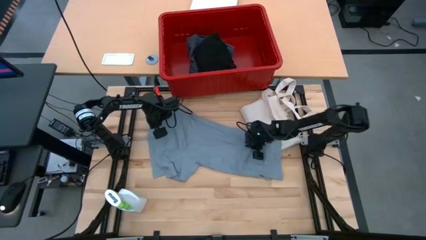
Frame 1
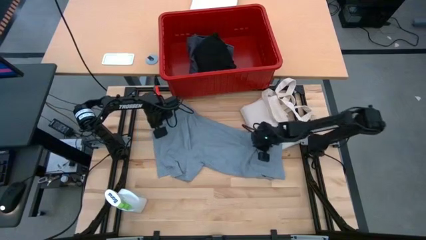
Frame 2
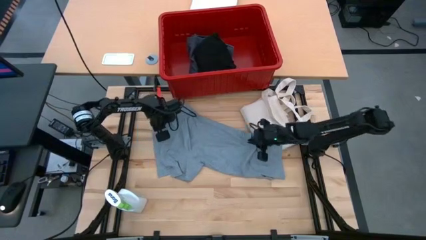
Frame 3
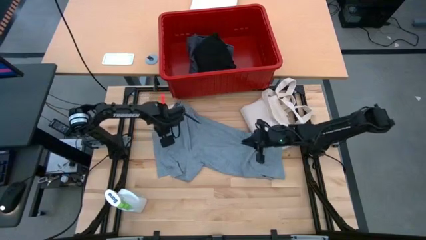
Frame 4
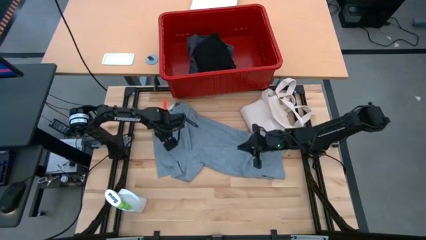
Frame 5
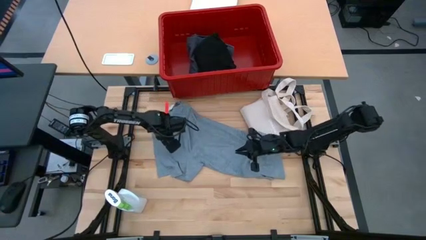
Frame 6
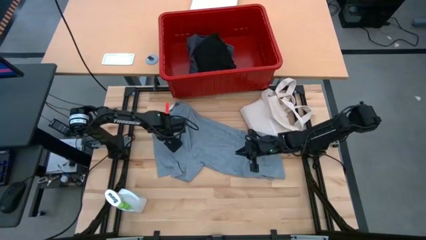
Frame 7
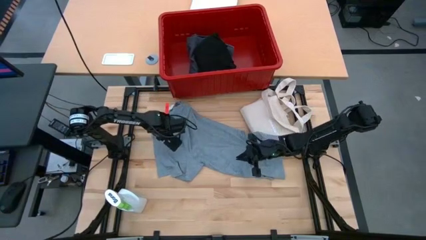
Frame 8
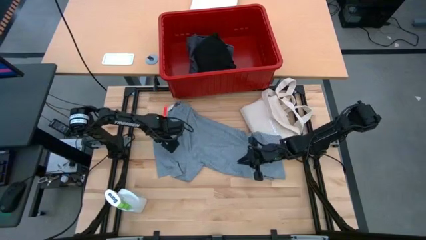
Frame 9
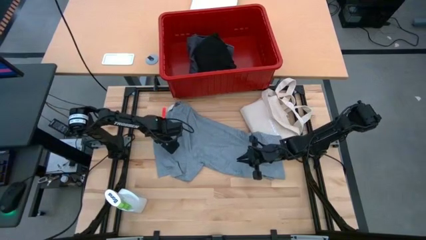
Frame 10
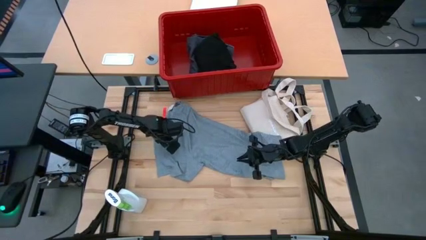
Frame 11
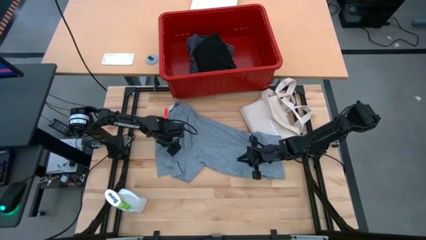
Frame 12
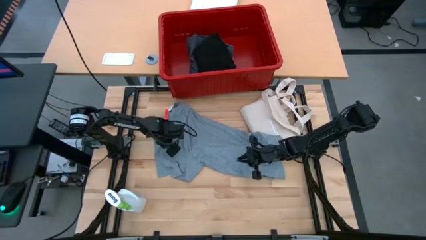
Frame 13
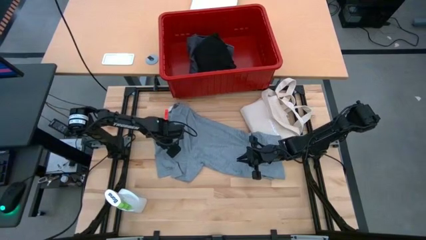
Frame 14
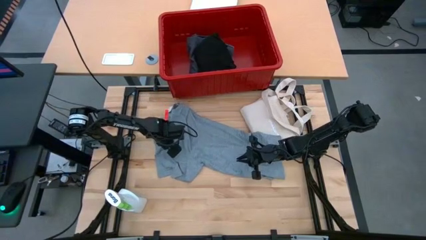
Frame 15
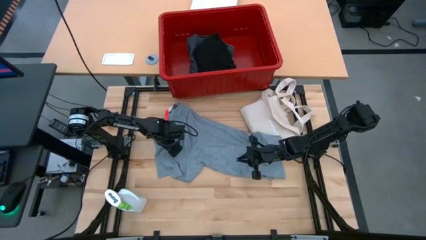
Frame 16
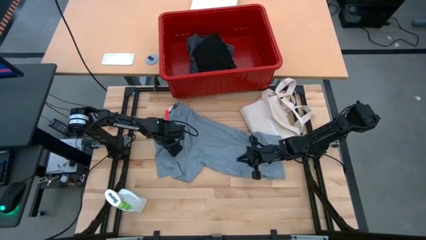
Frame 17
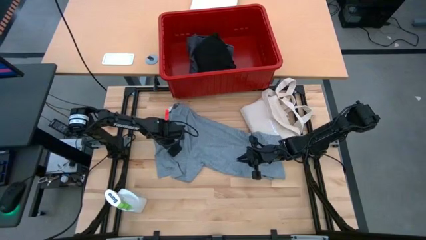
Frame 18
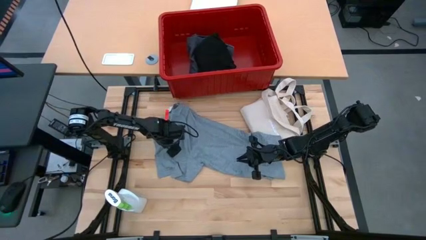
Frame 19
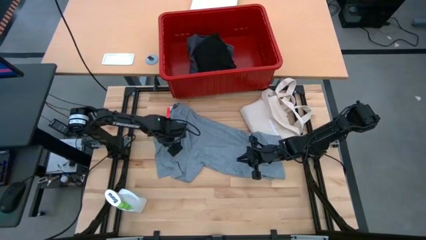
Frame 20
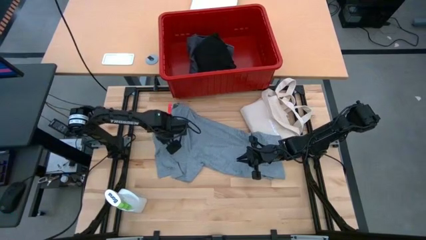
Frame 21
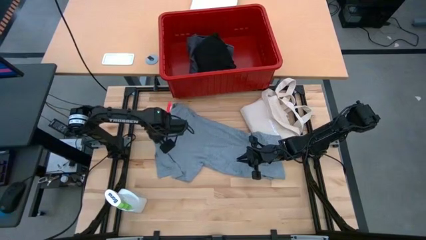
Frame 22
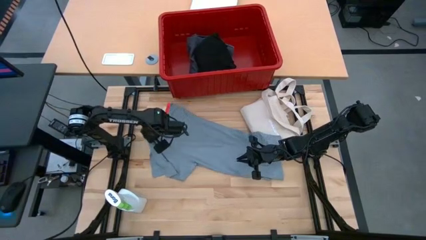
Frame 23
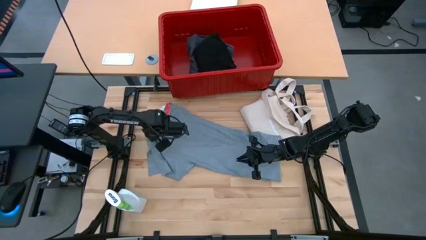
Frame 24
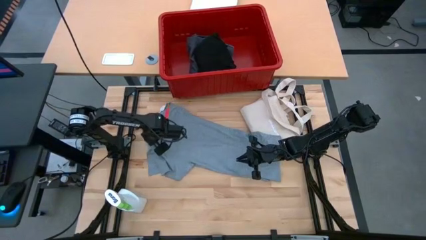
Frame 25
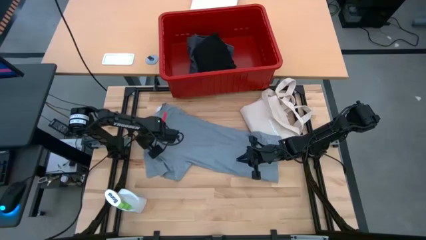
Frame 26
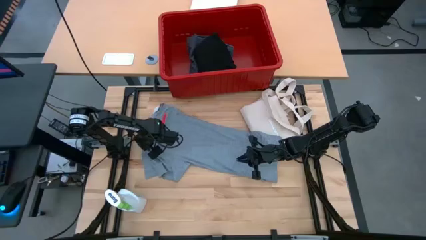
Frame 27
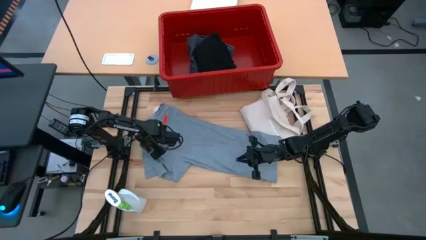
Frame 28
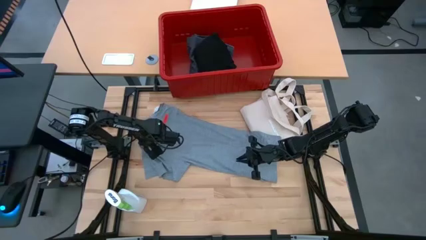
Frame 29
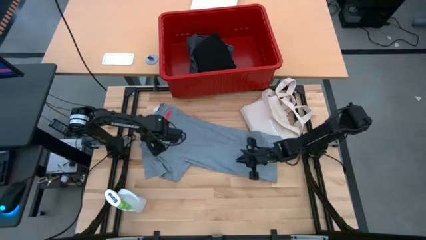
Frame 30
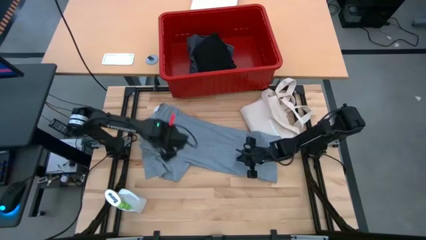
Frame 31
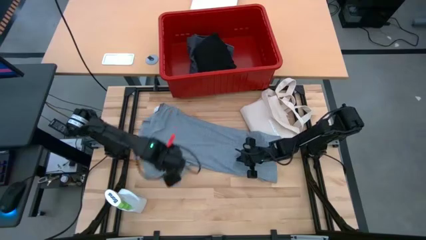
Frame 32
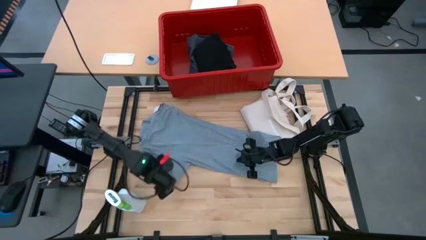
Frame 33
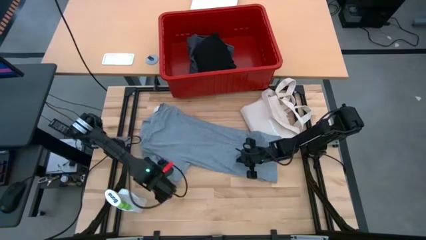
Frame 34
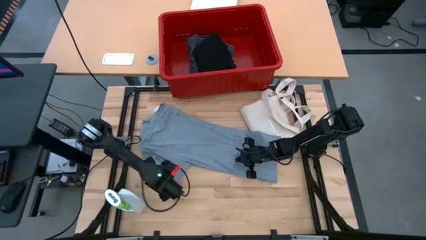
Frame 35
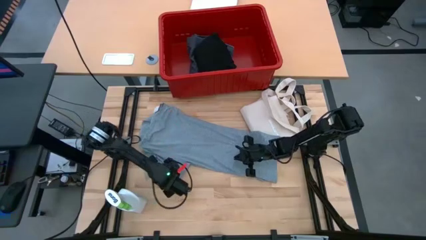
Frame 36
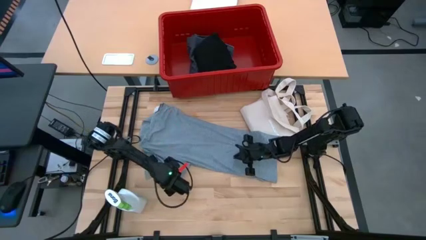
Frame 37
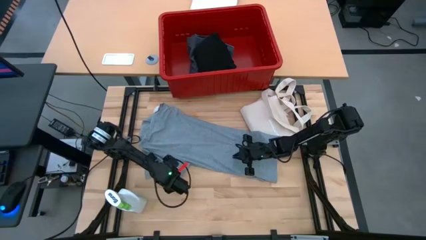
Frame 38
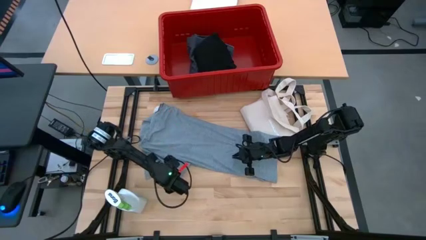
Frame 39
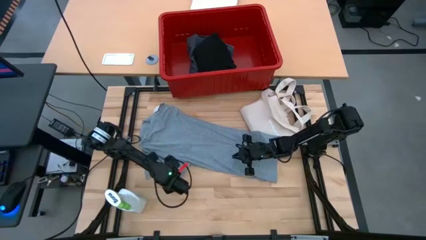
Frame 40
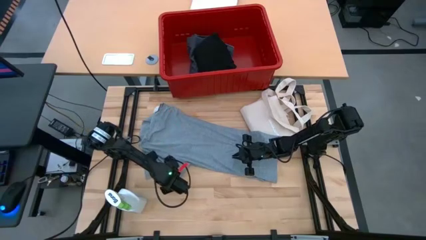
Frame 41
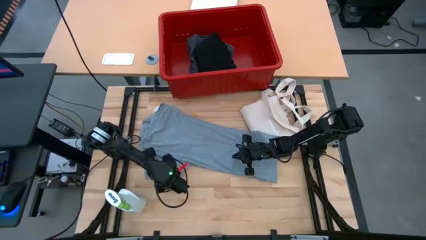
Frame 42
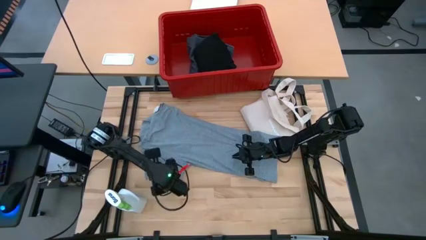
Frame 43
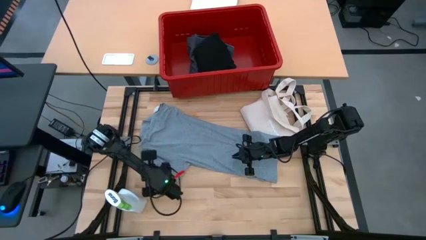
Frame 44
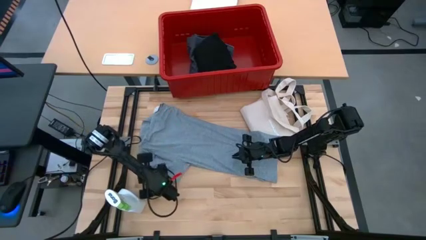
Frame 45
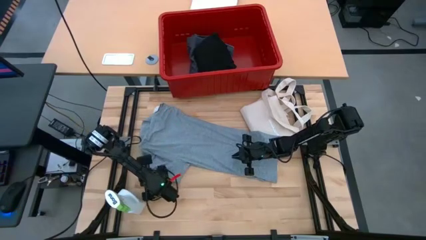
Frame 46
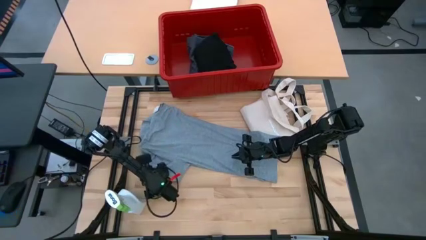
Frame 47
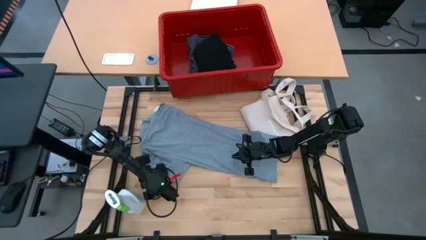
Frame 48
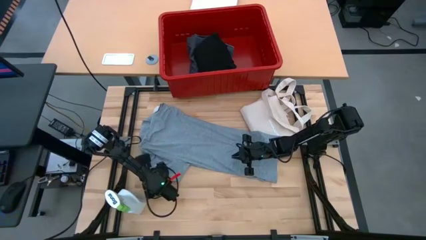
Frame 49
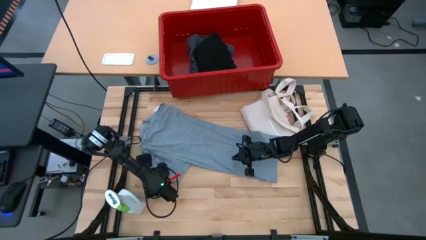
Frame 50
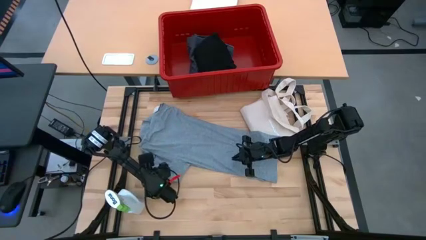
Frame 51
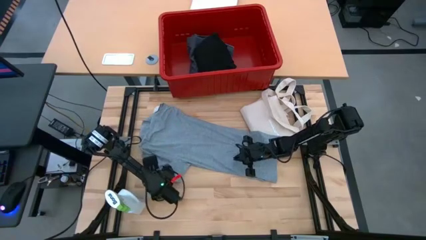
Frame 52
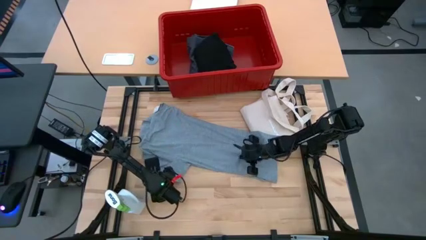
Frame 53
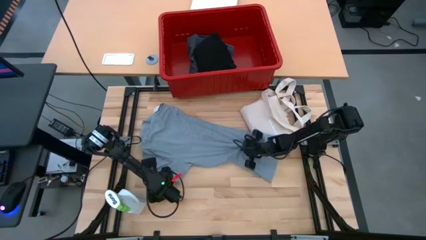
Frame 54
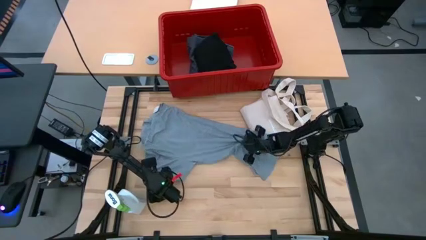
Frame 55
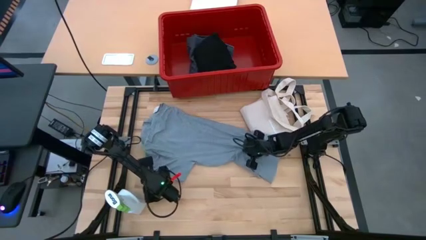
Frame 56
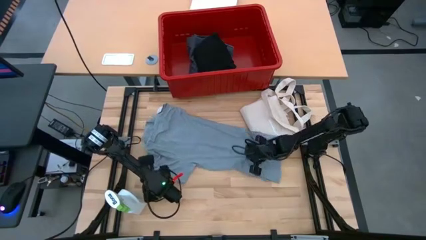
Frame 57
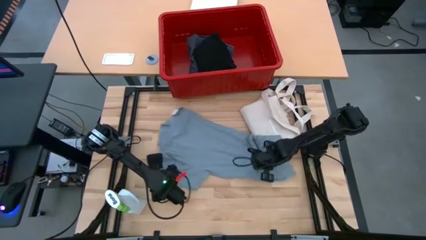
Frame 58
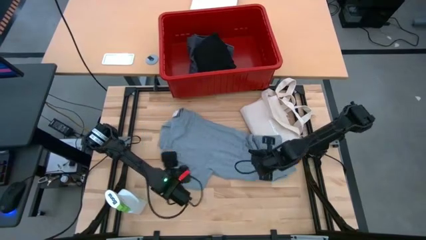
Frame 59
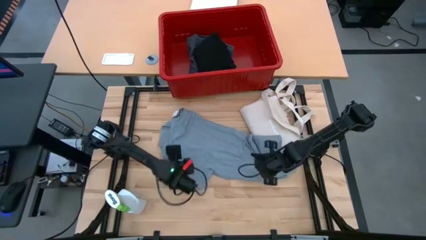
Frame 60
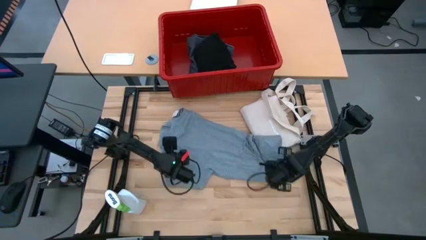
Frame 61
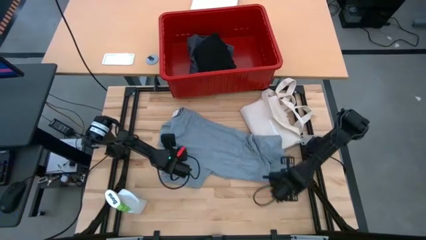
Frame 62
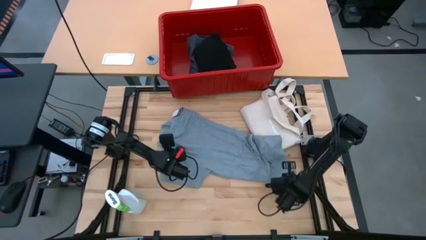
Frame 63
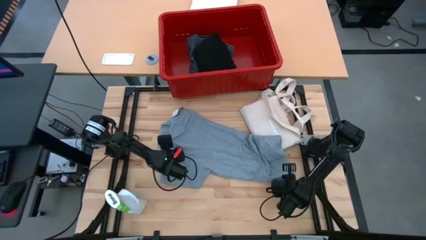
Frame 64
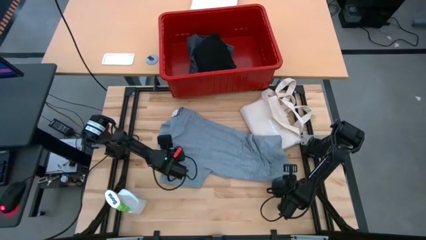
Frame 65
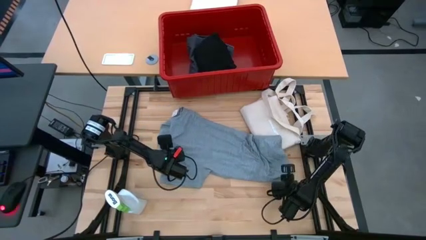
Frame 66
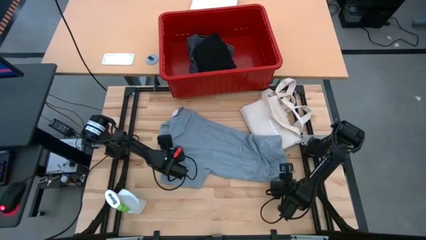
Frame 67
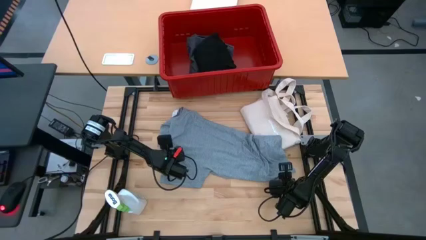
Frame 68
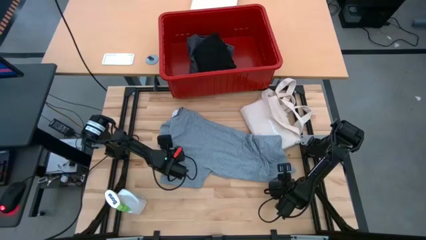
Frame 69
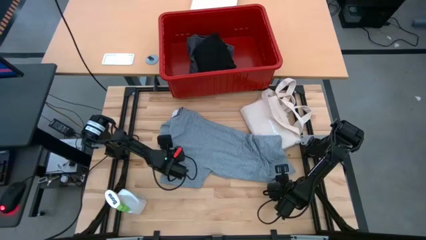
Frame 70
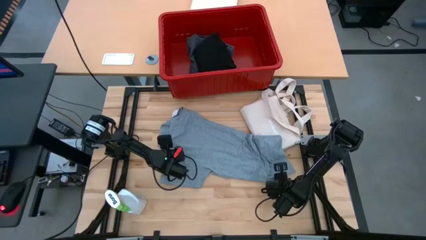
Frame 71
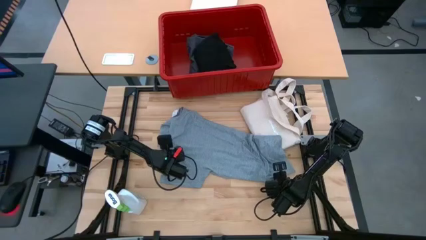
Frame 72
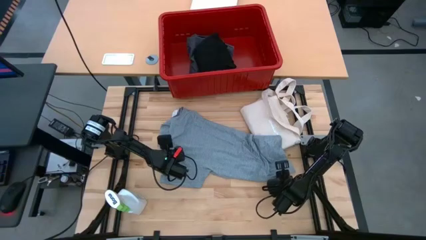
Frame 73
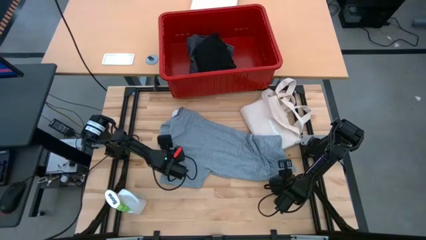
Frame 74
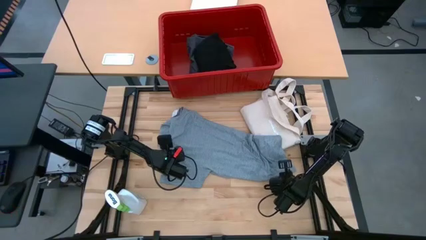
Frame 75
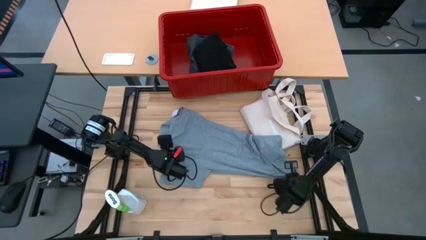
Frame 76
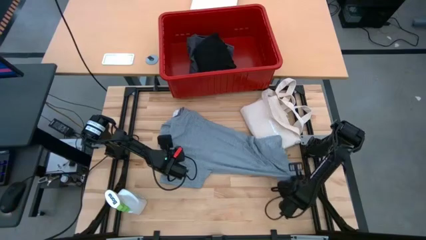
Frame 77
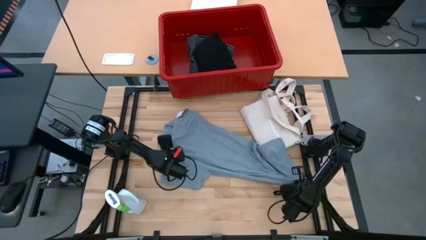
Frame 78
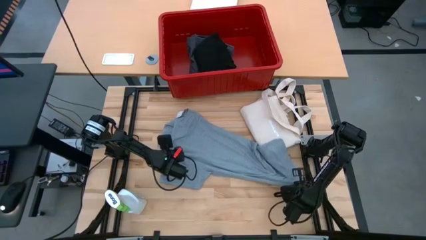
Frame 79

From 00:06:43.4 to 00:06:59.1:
Task: Fold Laundry from Bin
Fold the gray shirt
